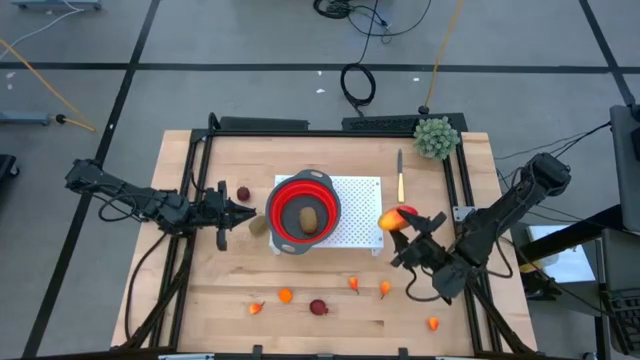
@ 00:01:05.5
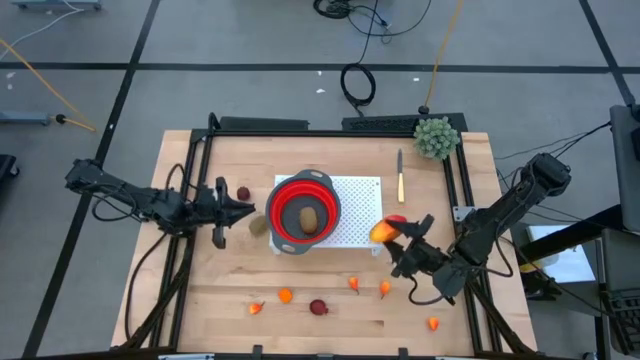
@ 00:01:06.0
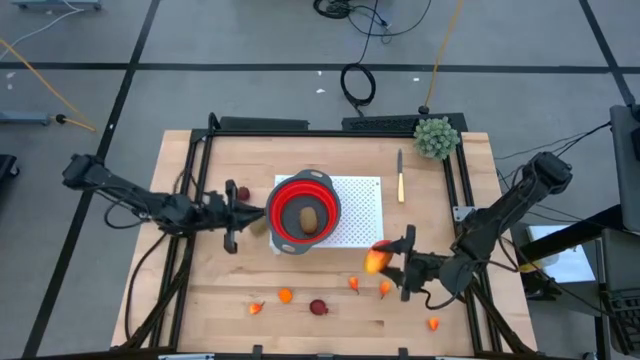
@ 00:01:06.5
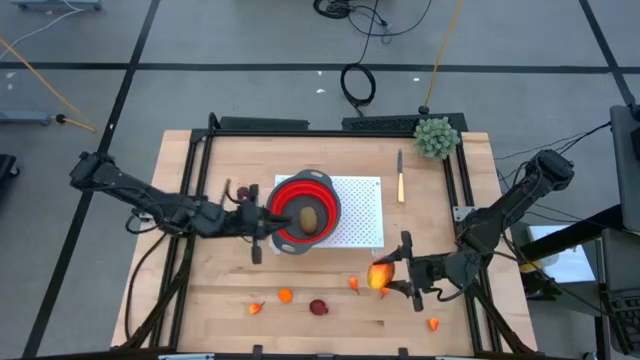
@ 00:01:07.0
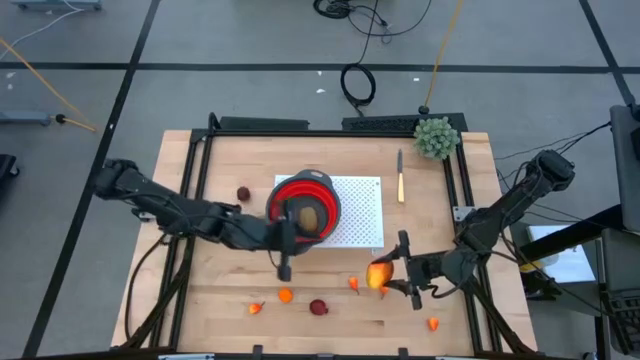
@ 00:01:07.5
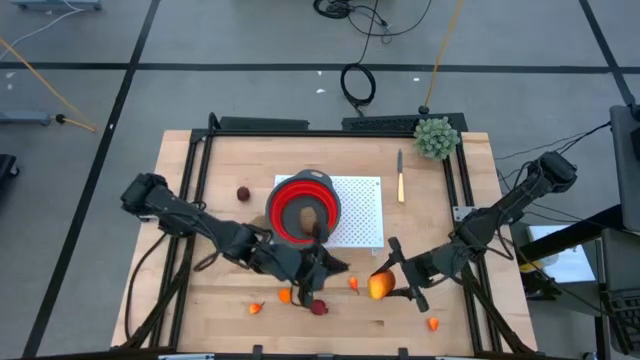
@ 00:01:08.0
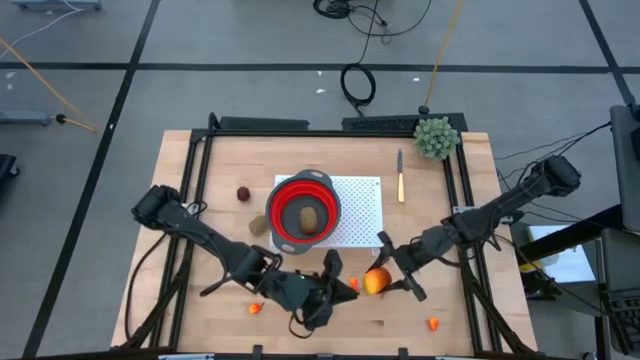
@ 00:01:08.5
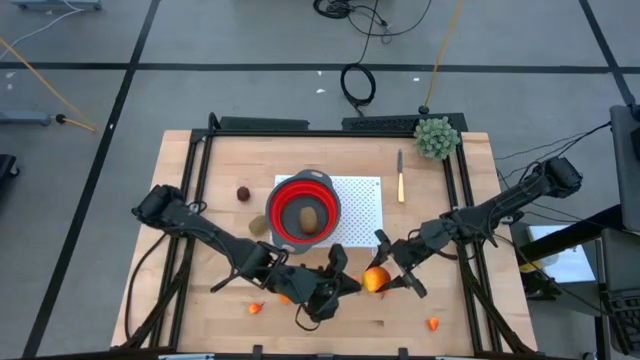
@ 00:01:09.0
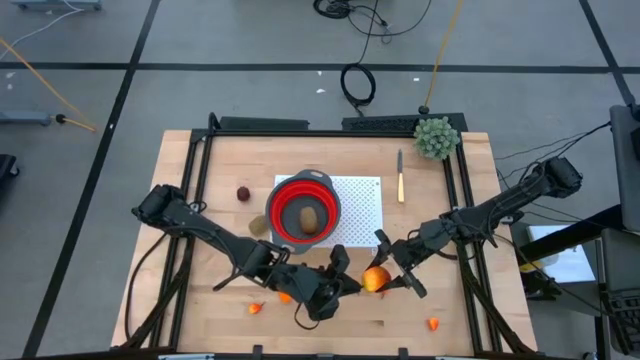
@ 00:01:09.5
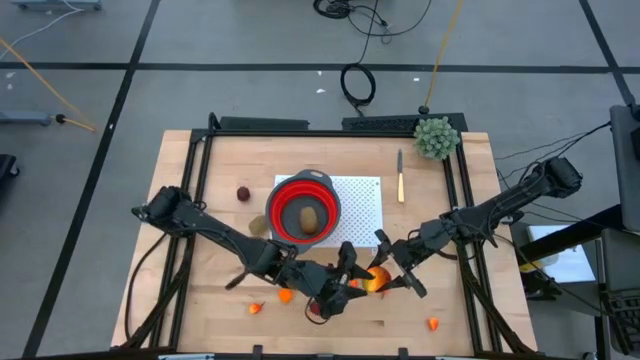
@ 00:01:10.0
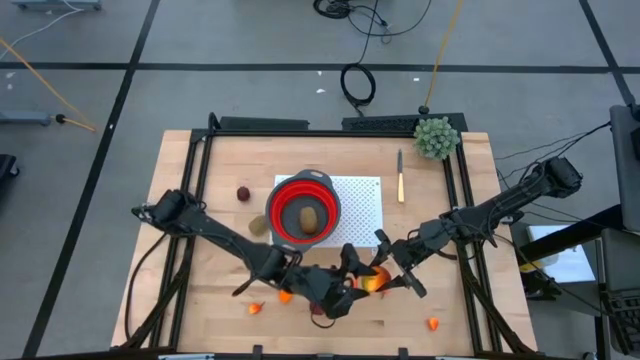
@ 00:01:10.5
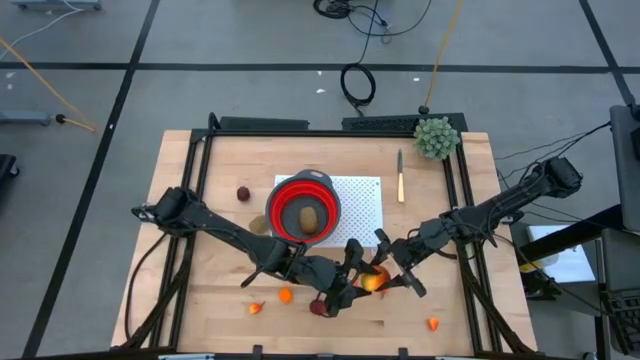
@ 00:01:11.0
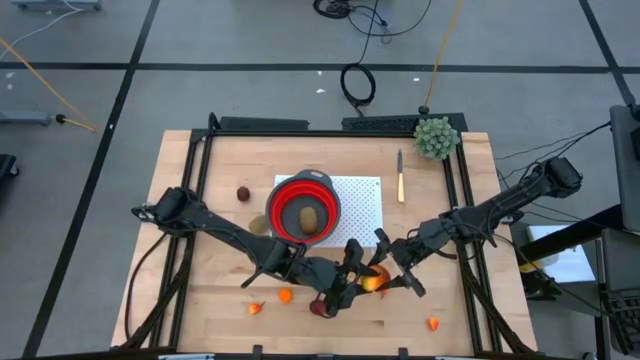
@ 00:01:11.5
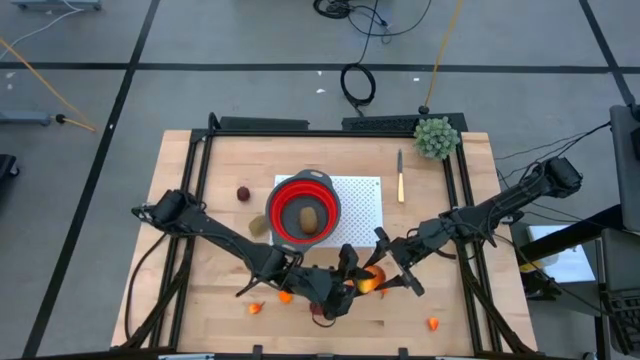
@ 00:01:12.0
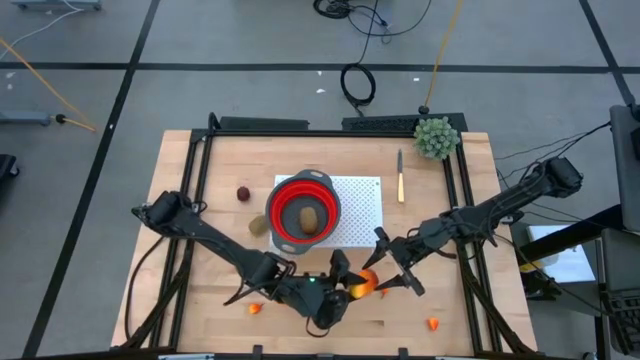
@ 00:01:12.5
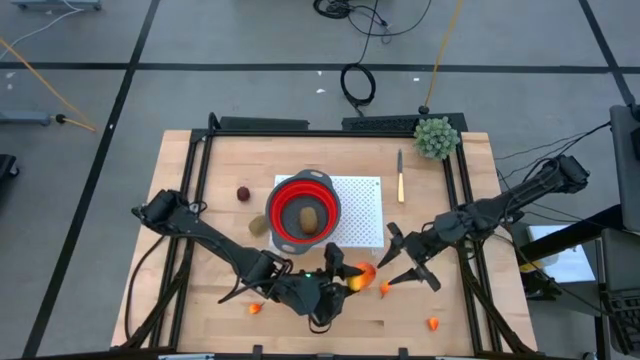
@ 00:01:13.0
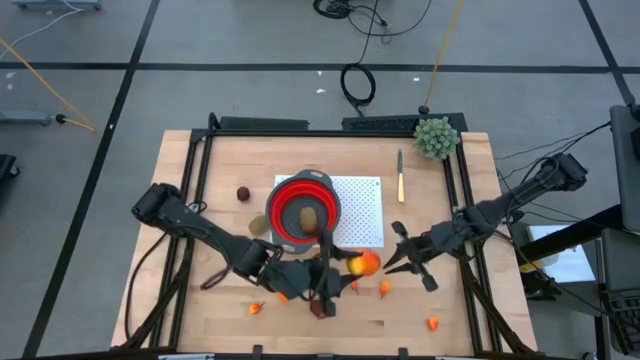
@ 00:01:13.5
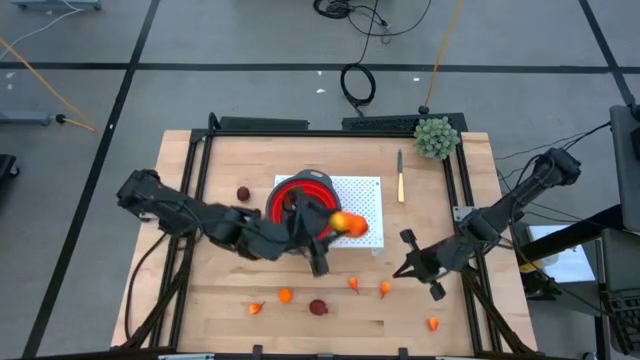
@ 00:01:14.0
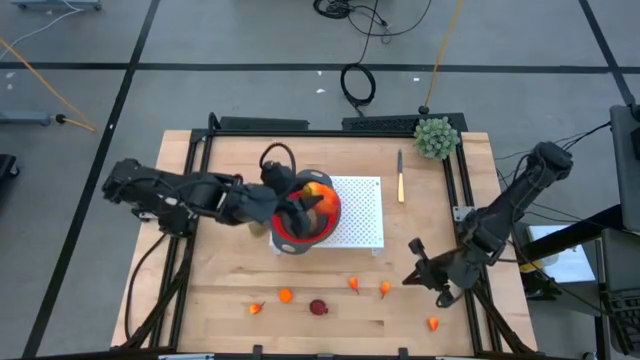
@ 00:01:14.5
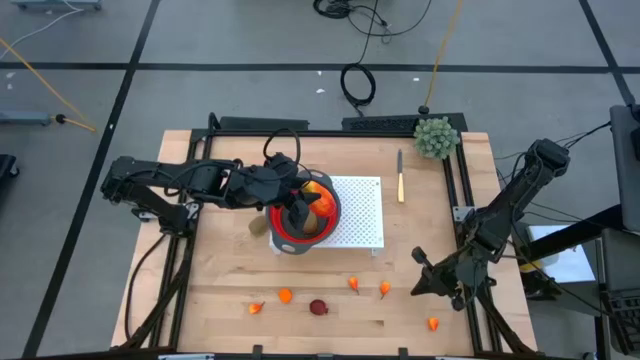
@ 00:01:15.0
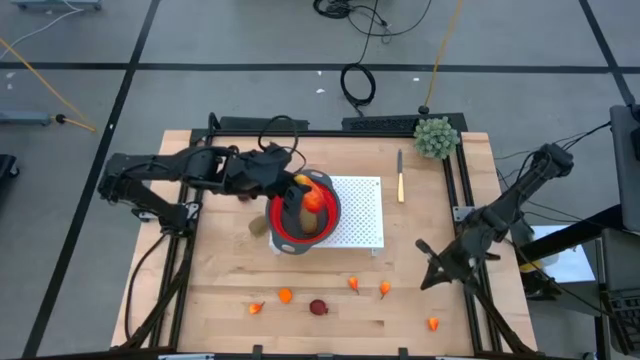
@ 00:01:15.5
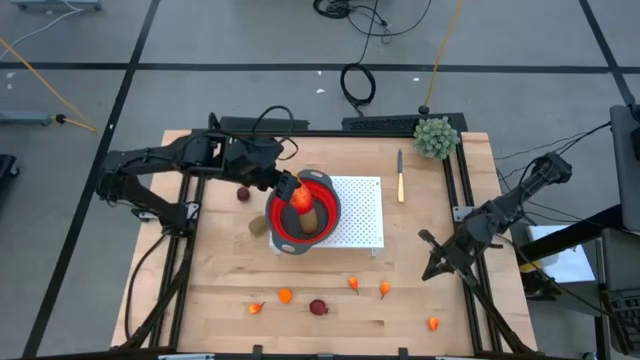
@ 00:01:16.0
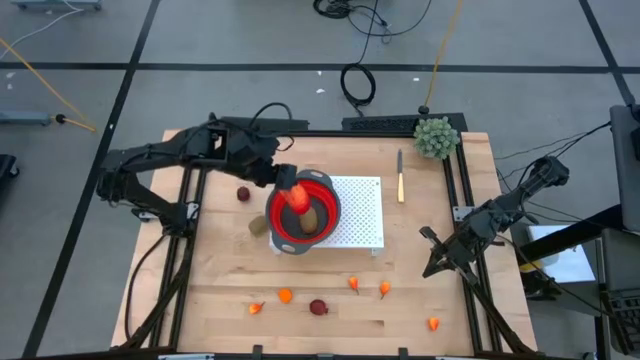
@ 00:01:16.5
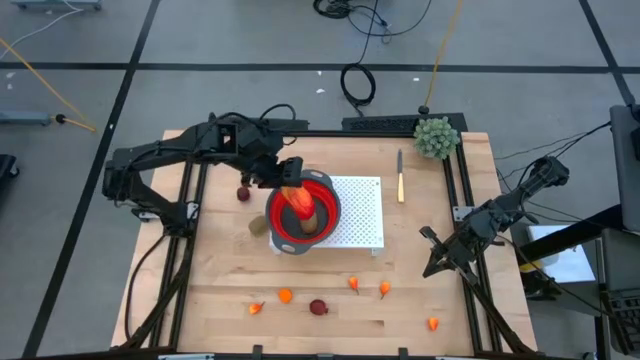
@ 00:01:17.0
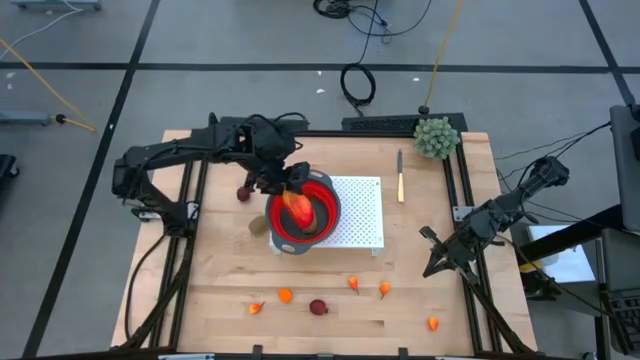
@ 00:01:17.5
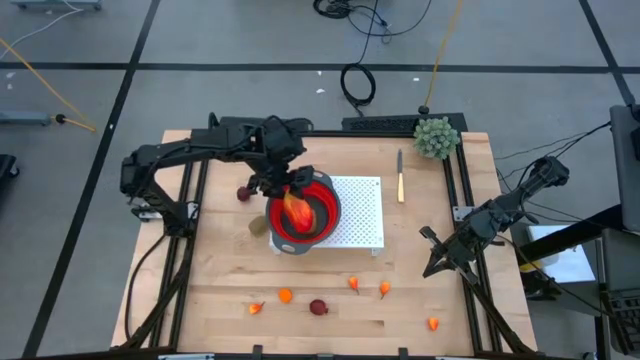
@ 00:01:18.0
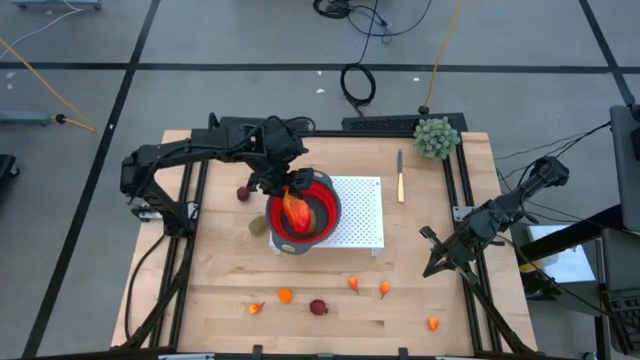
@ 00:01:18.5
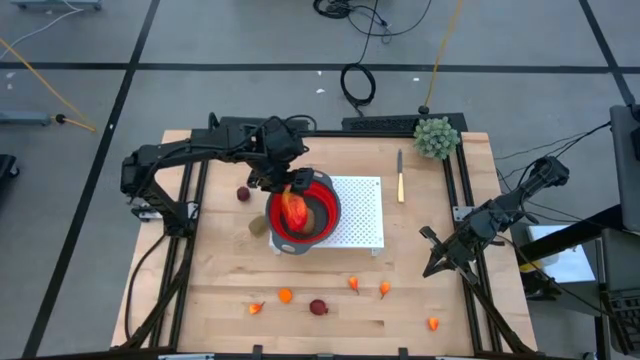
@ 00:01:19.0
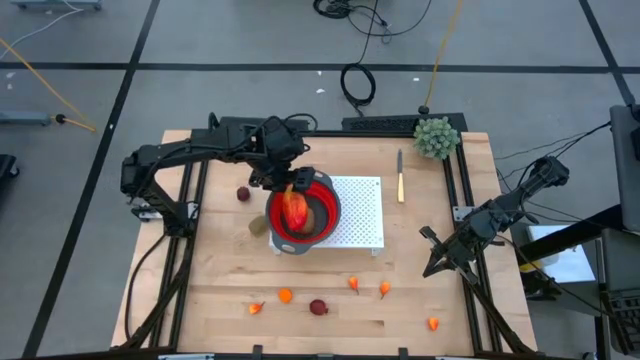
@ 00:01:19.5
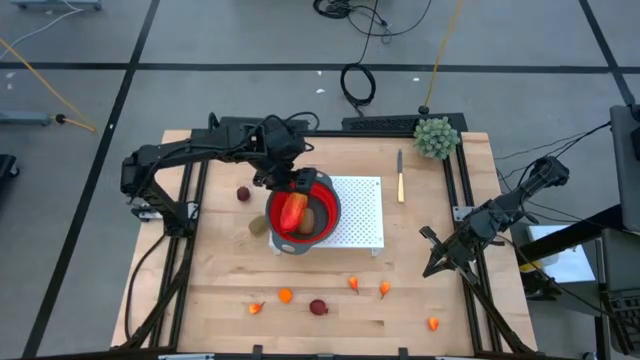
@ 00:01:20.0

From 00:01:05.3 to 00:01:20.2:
Task: Pick & Place Fruit
Put the mango into the strainer bowl on the shelf

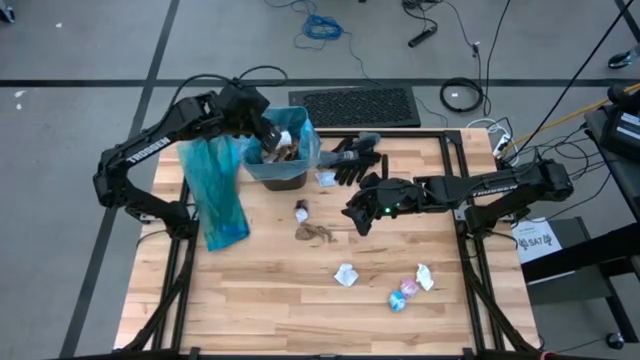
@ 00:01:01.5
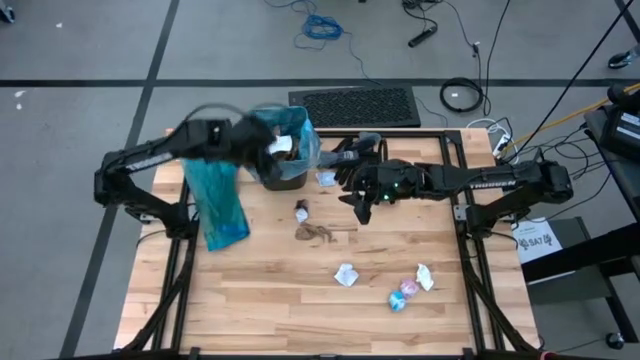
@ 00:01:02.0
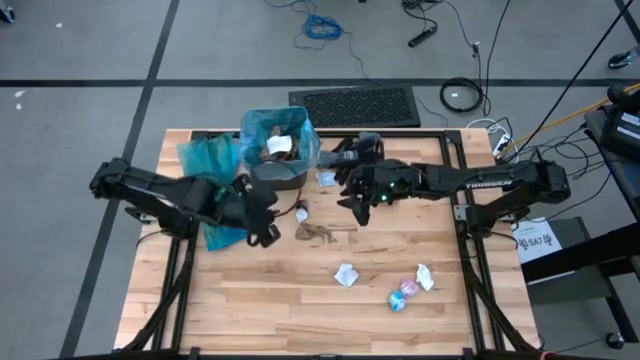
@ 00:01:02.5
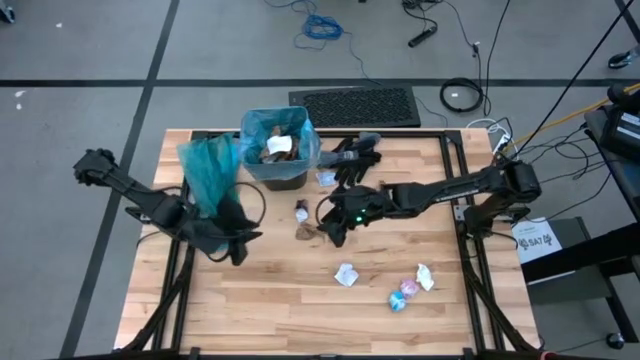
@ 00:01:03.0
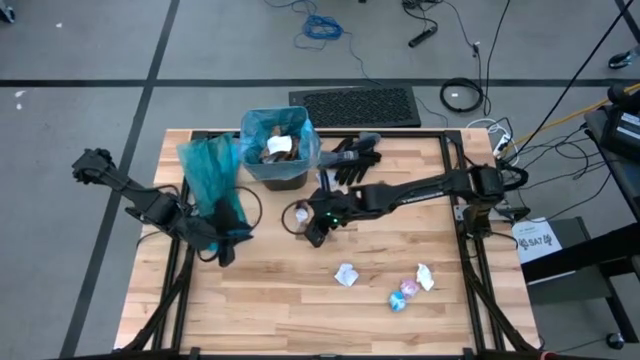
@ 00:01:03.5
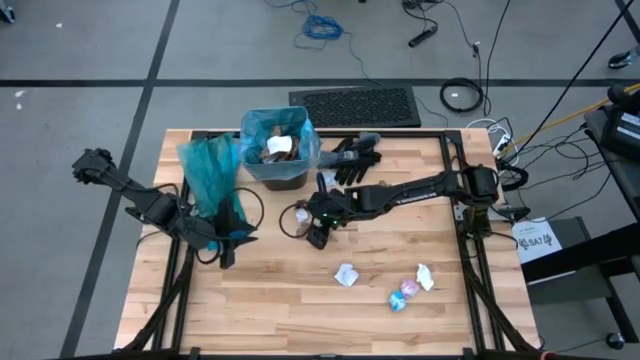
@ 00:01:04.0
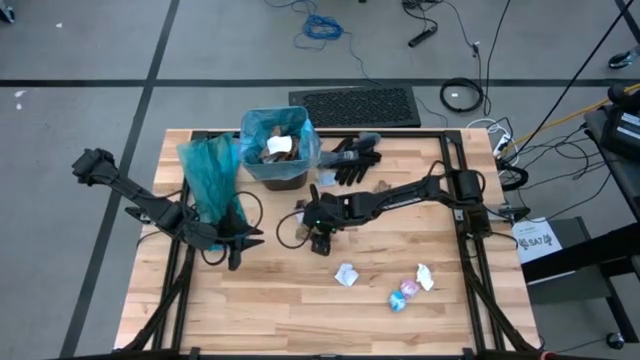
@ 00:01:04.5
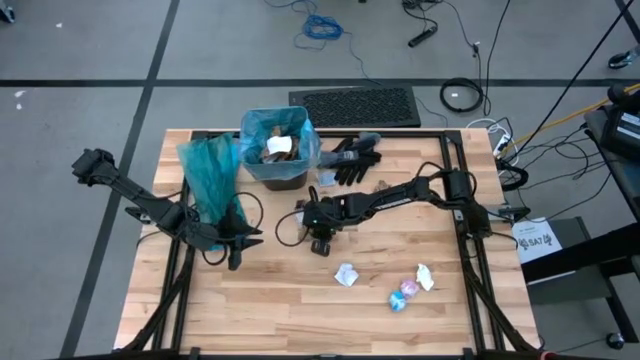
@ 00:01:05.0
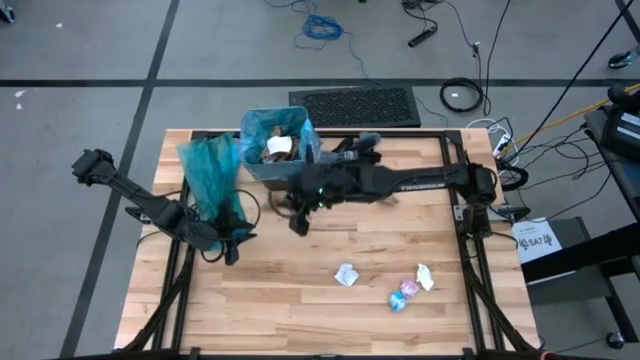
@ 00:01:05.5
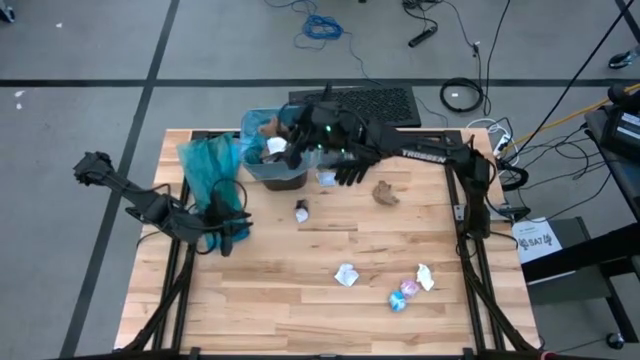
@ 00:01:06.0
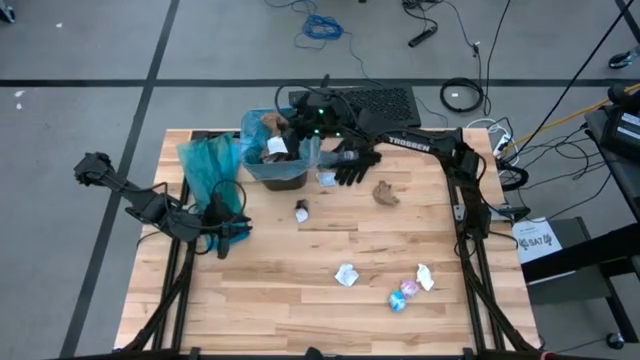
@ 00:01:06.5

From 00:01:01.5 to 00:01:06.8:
Task: place trash/remove bag and relplace
Put the brown napkin into the trash bin
